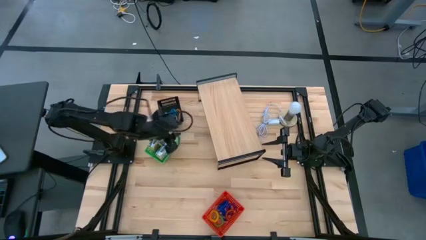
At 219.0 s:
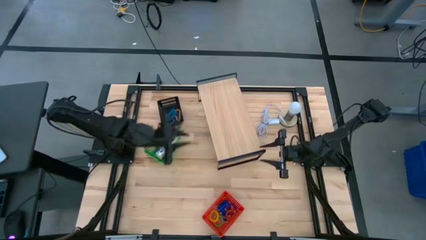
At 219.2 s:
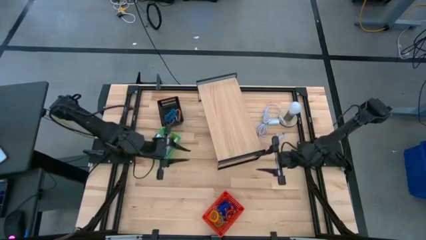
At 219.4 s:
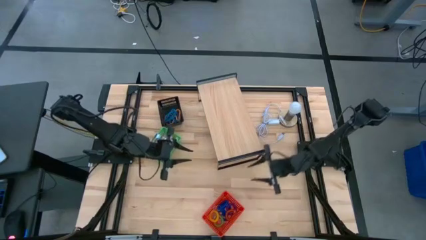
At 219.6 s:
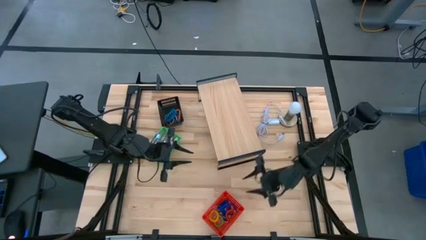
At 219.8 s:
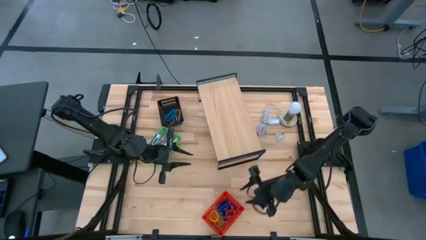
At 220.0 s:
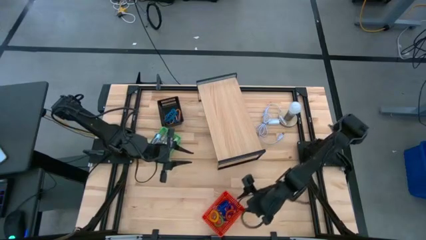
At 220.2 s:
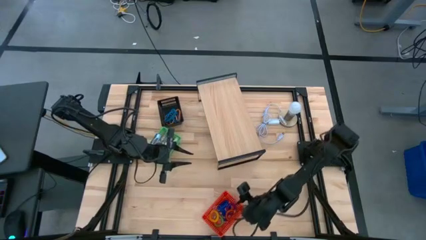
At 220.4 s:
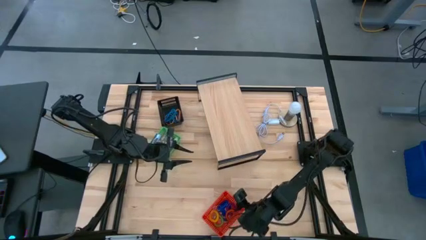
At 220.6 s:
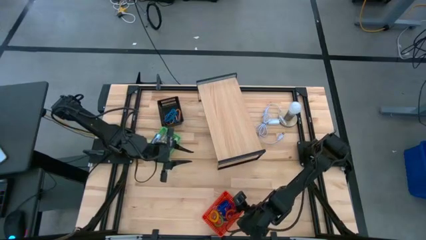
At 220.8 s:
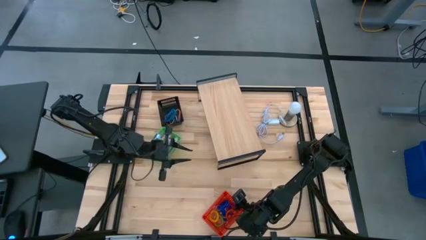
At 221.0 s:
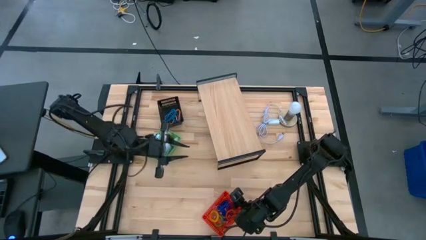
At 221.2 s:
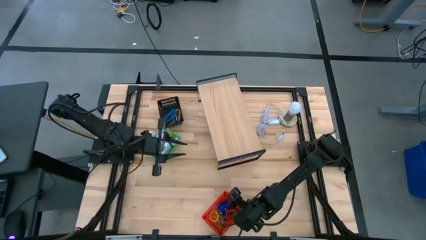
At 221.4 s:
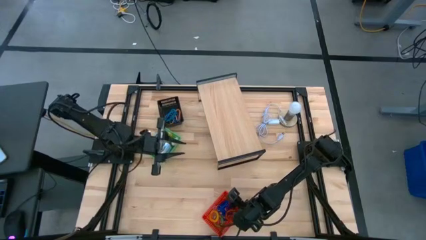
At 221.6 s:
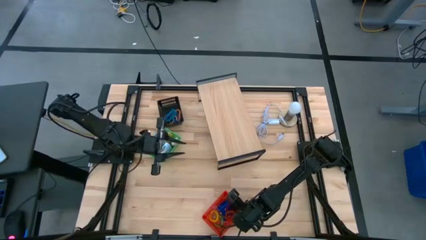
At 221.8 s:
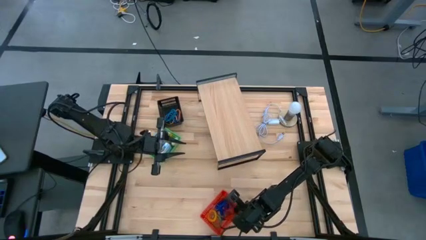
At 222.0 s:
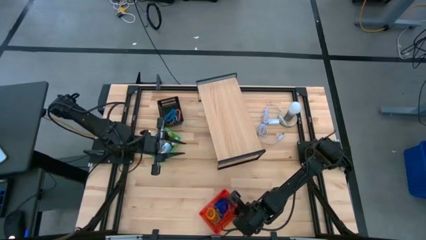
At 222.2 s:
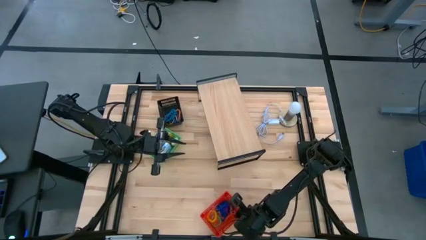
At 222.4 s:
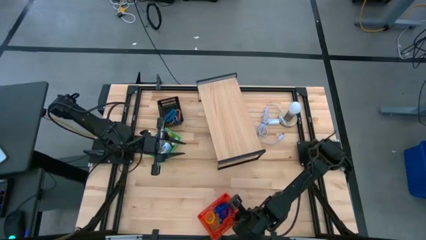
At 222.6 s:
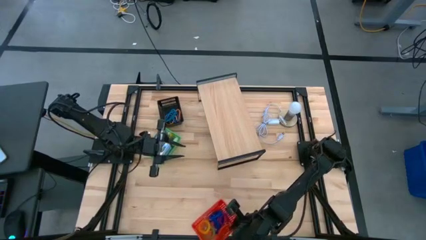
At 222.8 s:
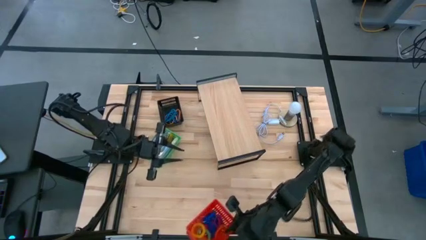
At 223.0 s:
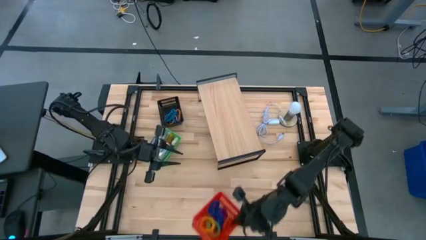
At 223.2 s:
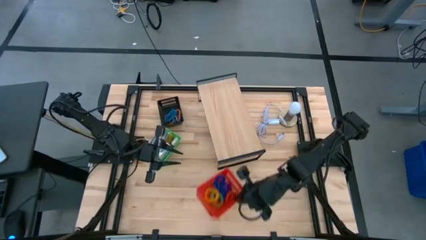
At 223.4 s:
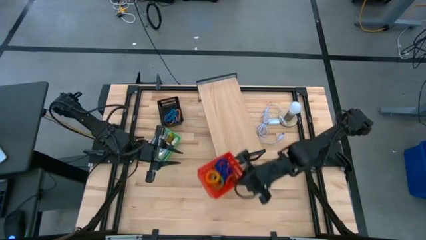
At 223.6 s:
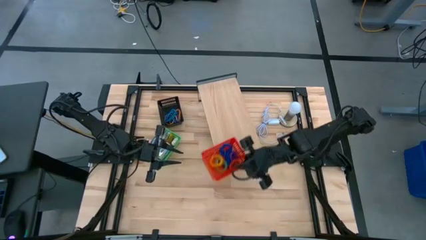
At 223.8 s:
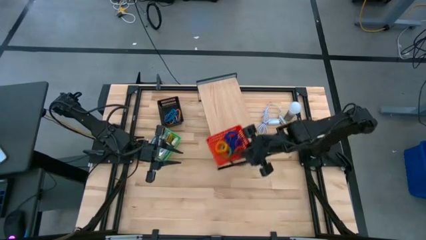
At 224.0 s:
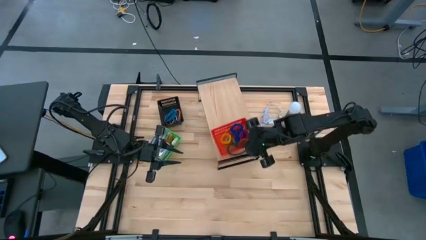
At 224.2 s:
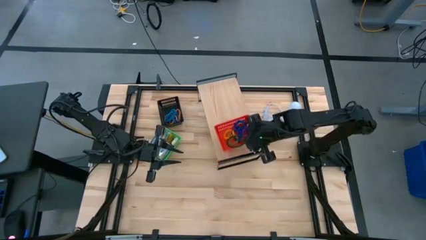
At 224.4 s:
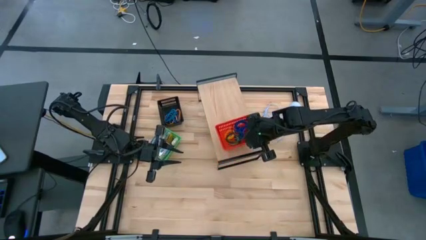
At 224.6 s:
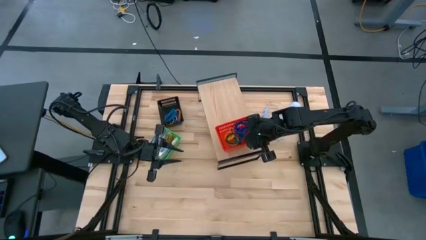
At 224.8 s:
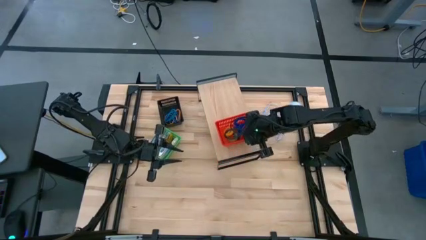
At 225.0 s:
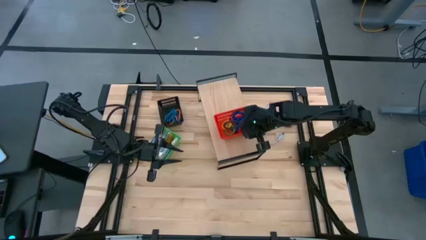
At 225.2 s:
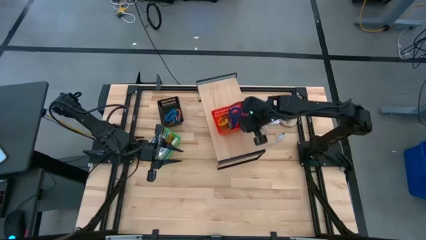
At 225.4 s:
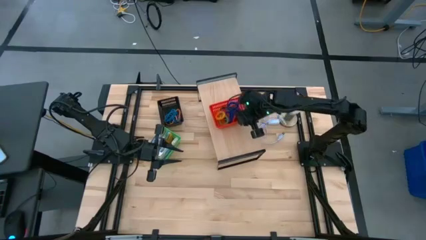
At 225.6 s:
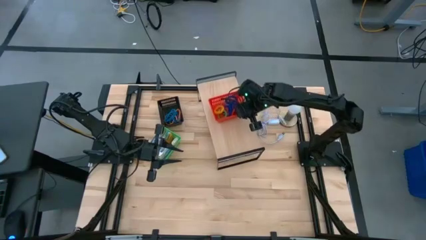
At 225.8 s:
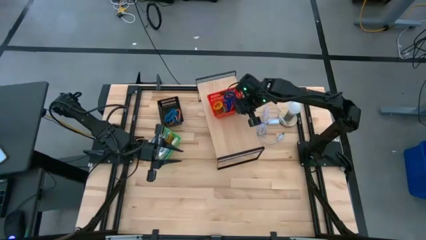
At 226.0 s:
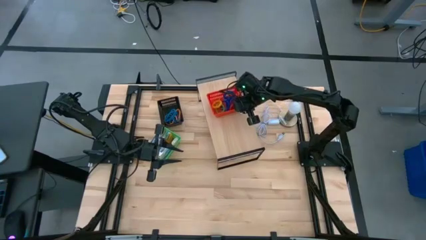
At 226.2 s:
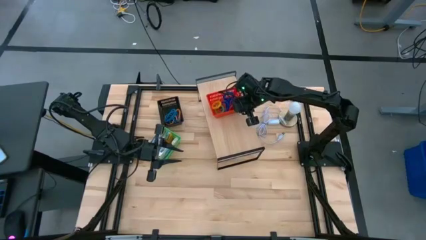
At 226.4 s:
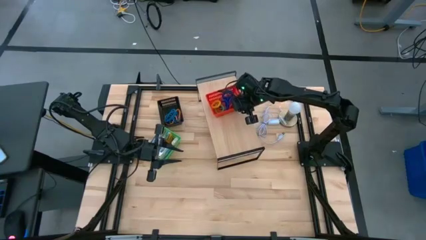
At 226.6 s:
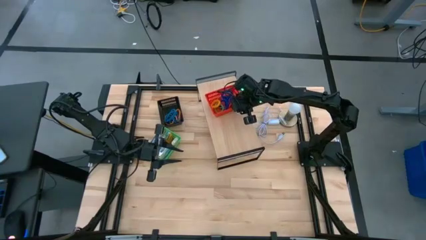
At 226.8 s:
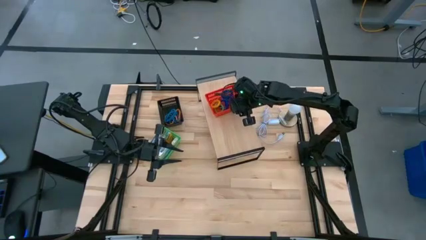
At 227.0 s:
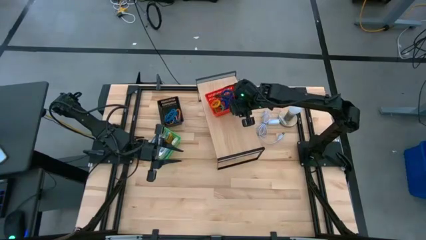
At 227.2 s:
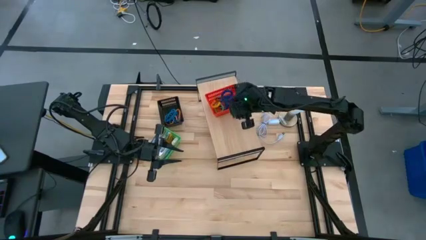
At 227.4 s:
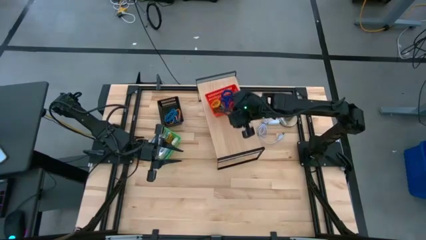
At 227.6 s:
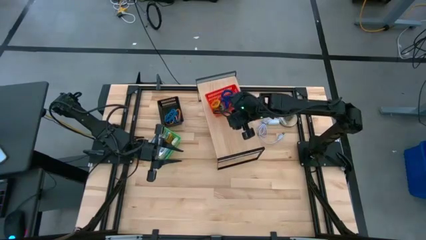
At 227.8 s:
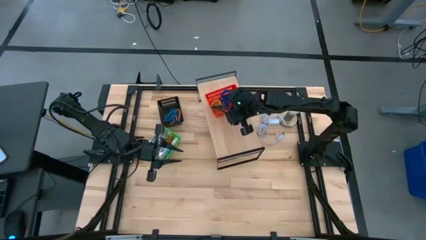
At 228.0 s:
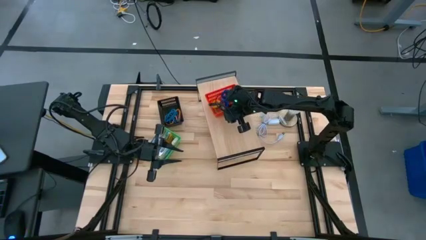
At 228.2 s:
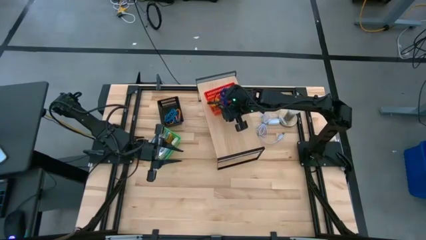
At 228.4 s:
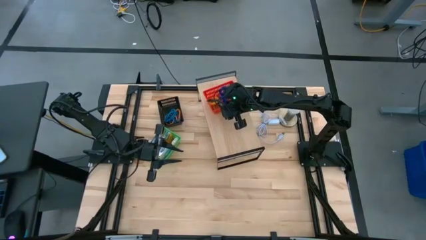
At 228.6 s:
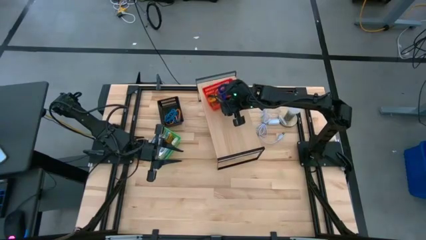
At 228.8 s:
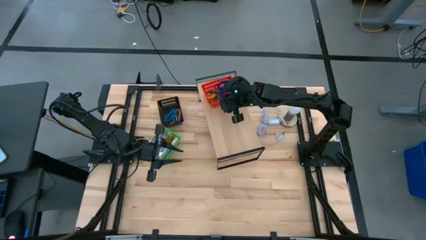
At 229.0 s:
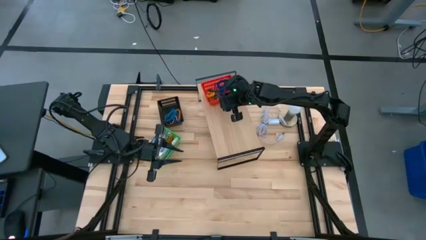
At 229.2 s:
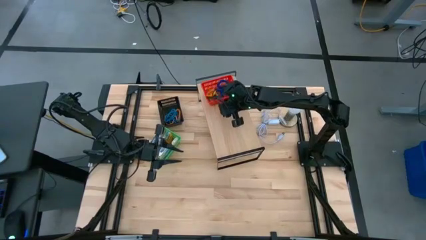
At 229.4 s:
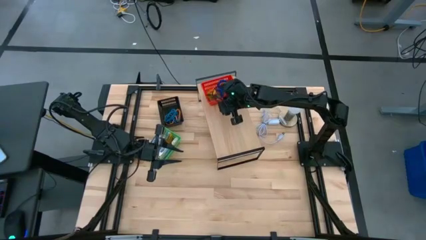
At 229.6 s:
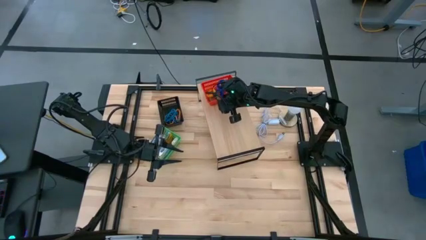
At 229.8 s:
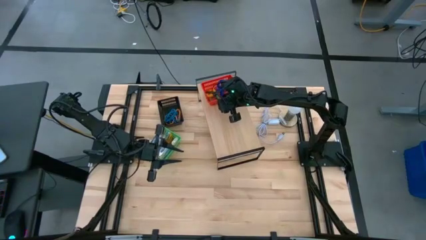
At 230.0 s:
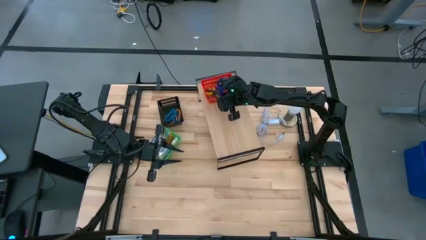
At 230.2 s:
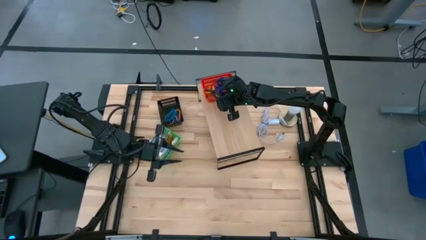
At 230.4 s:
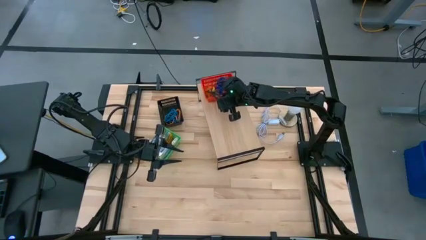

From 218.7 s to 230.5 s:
Task: Pick & Place Office Desk Supplies
Put the red basket with spring keychains on the shelf

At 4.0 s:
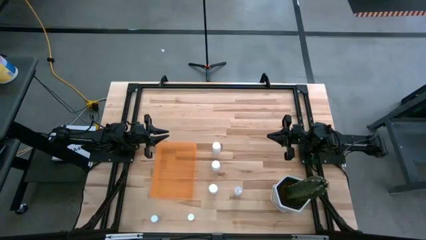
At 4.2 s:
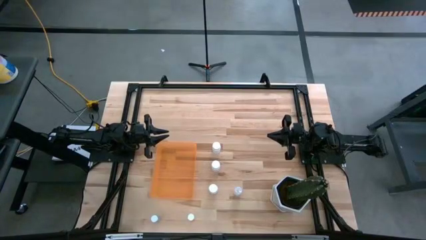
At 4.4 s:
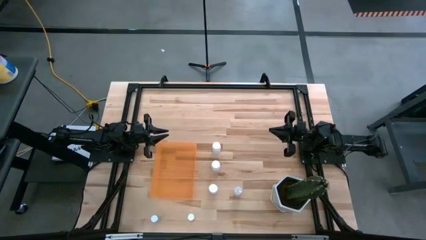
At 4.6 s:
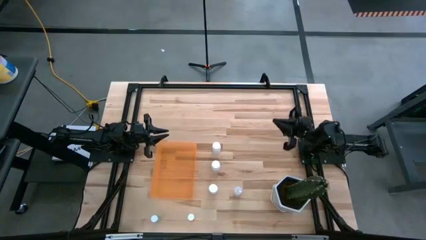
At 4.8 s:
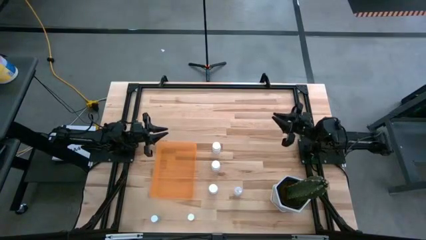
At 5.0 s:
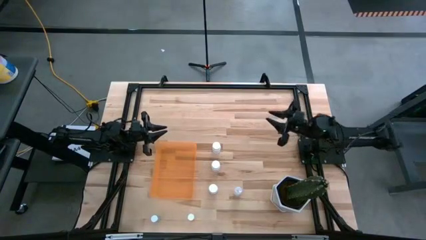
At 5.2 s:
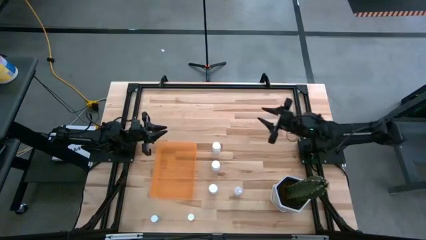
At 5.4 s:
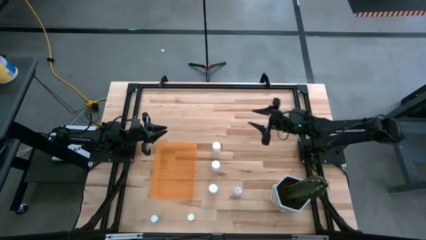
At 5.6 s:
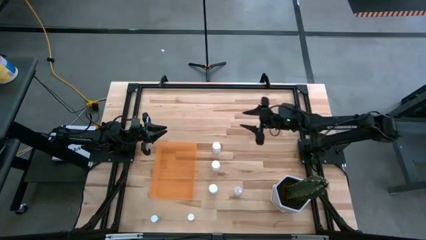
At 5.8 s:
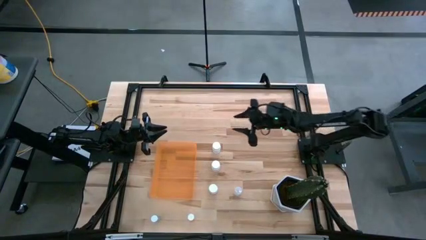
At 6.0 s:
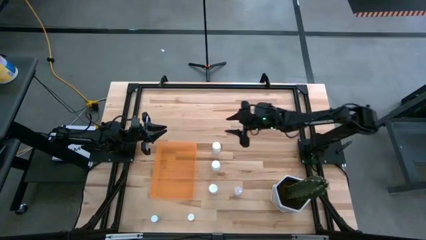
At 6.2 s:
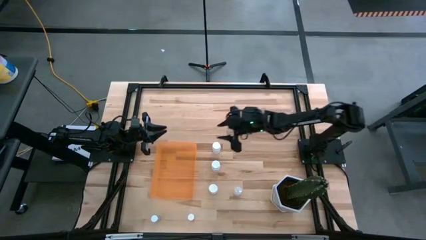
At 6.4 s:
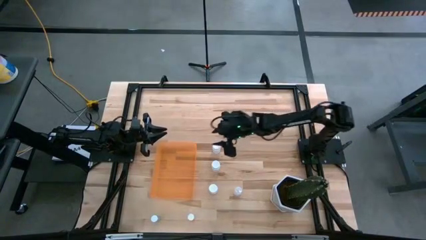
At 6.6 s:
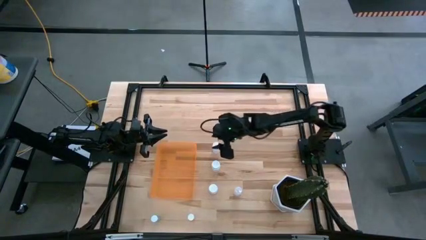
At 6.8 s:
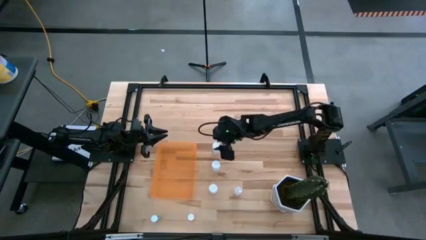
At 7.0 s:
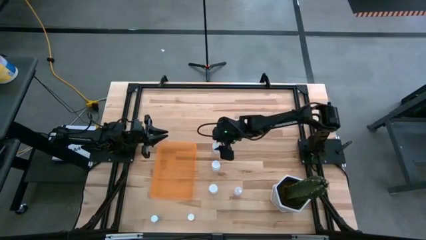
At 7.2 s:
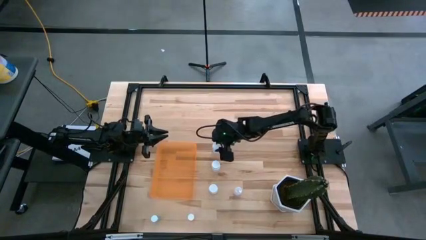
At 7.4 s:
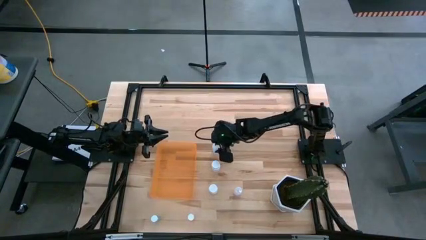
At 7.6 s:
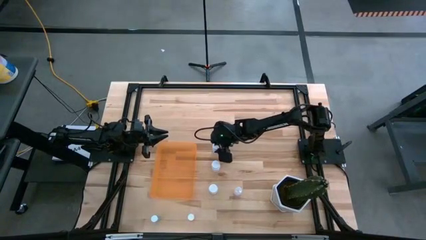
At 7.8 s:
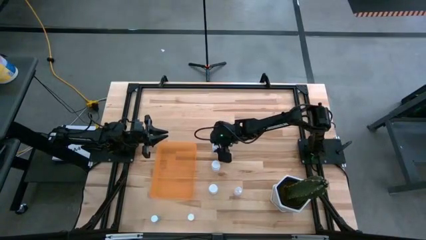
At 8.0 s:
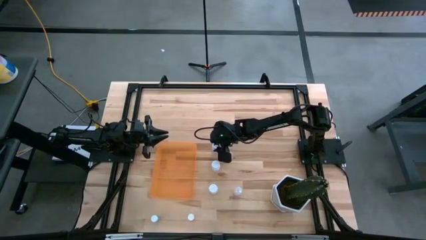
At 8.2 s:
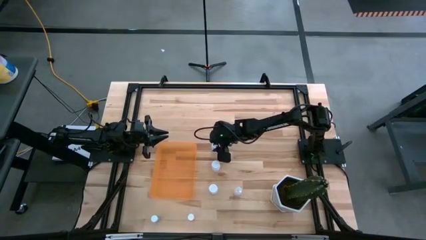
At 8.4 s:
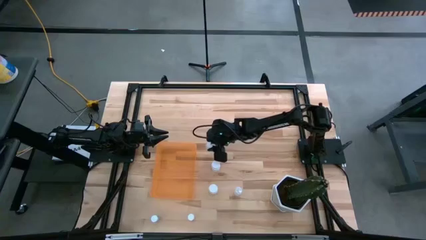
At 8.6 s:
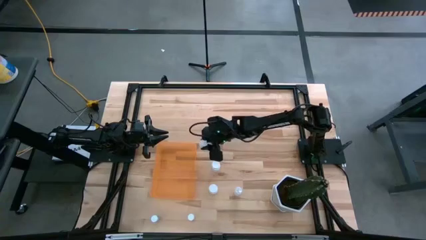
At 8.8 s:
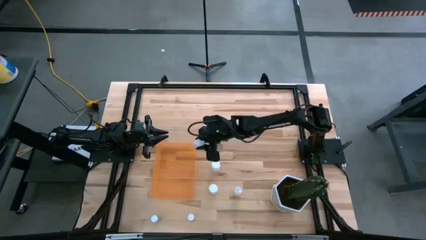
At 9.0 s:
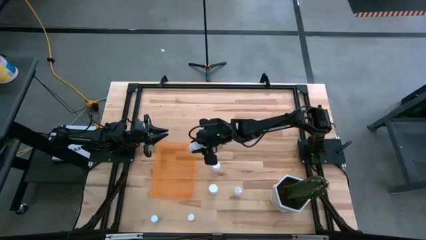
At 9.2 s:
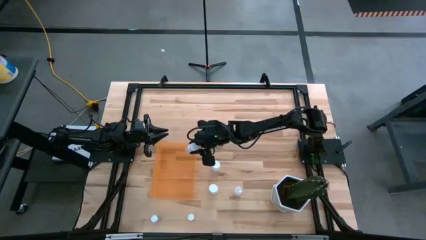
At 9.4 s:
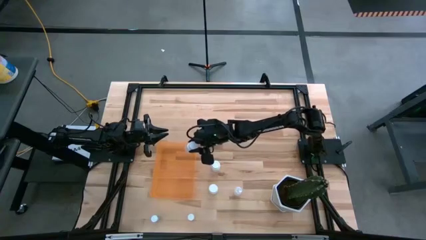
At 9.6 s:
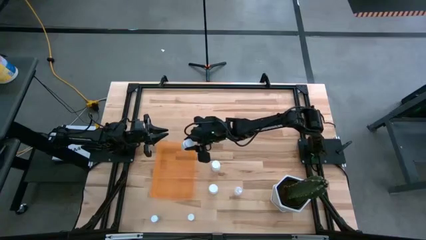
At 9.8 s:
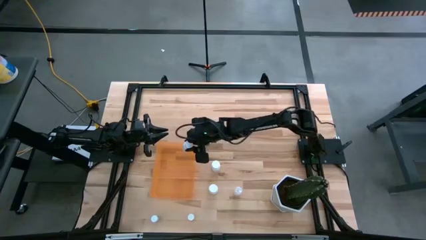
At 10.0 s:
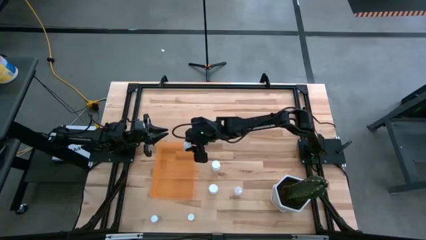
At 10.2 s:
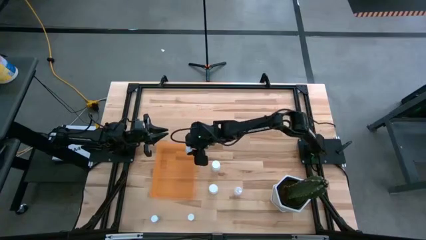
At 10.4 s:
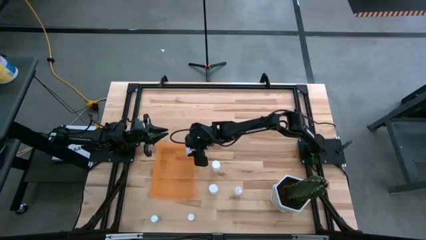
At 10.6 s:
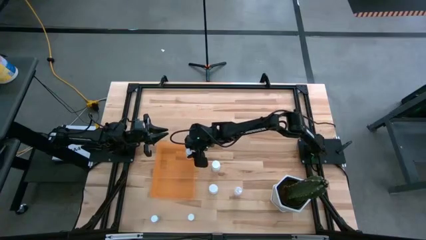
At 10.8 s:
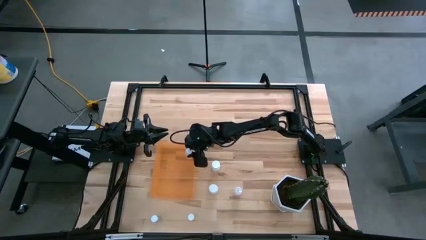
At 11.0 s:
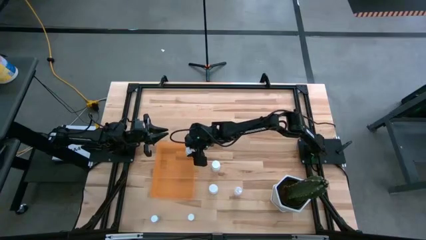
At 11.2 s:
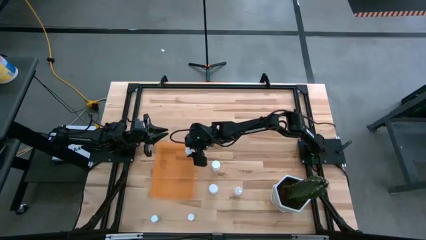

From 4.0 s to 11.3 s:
Task: Pick and place pill bottles into a basket
Put the top white pill bottle into the orange bin
